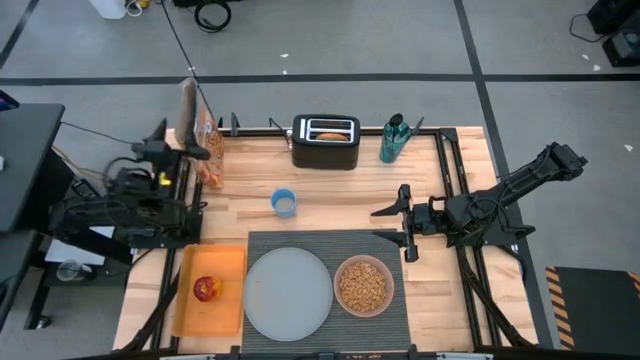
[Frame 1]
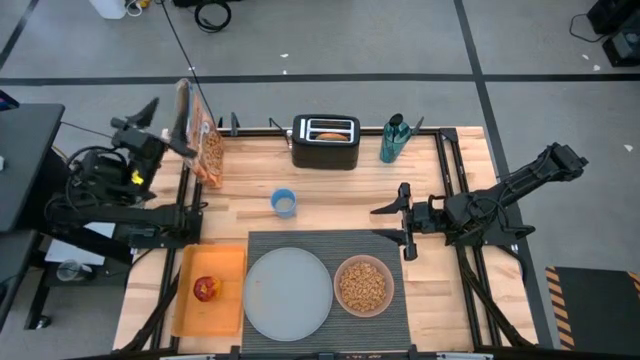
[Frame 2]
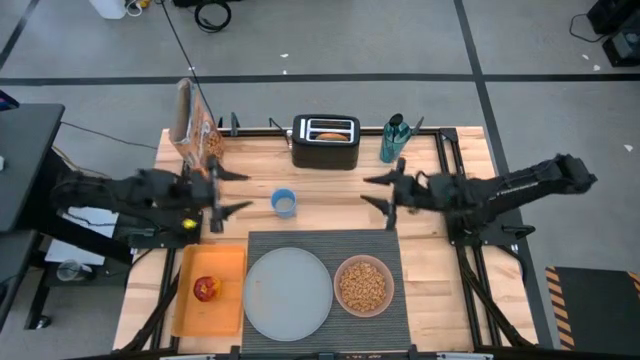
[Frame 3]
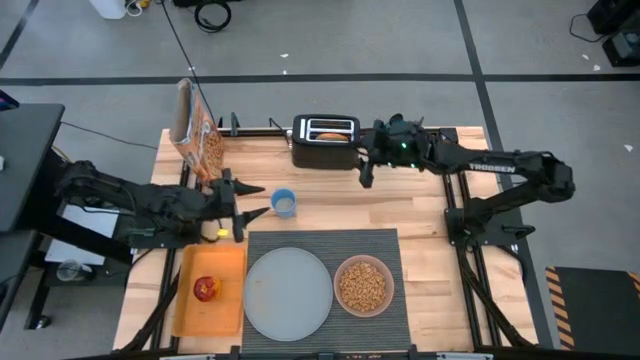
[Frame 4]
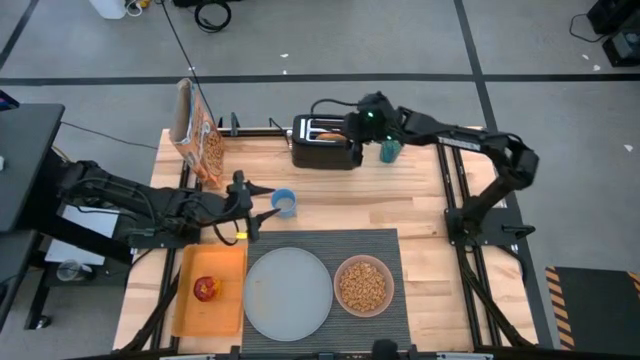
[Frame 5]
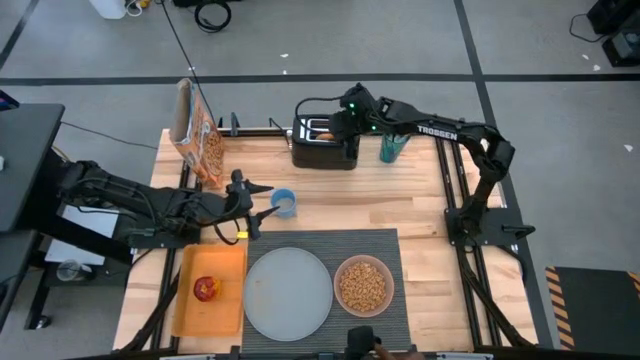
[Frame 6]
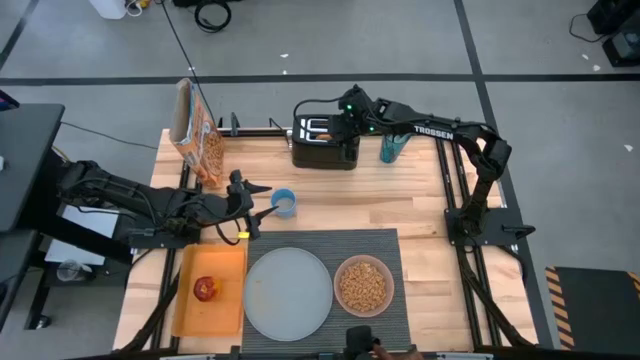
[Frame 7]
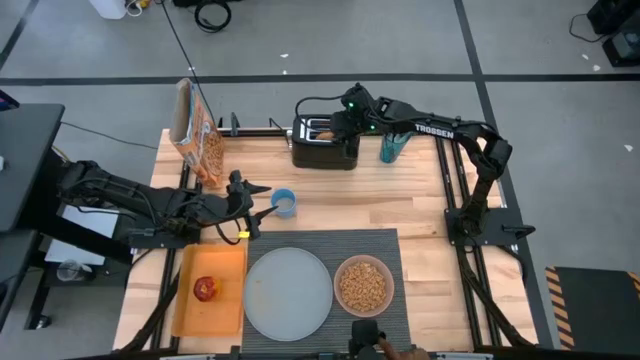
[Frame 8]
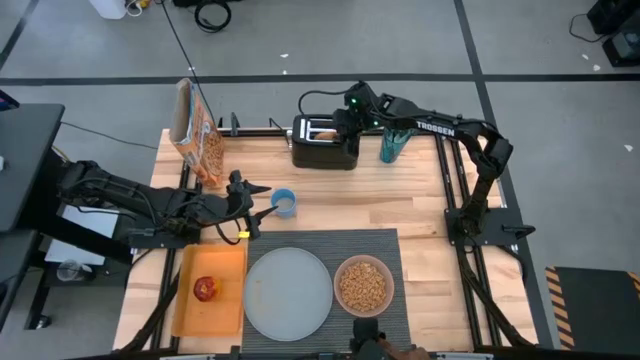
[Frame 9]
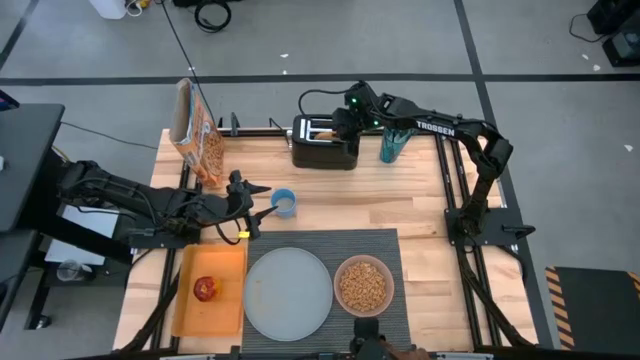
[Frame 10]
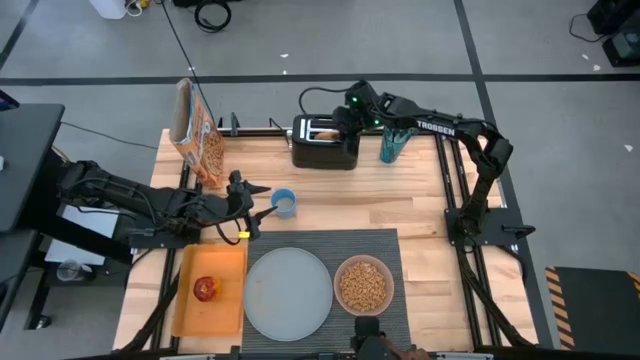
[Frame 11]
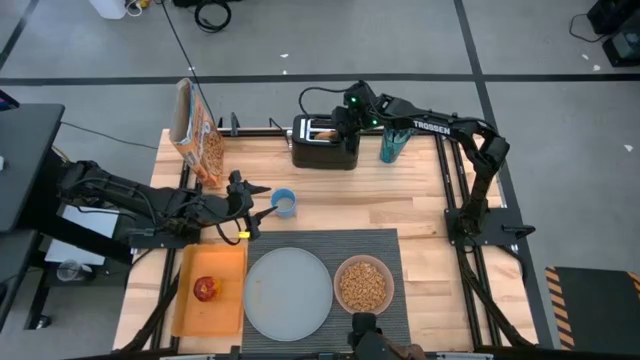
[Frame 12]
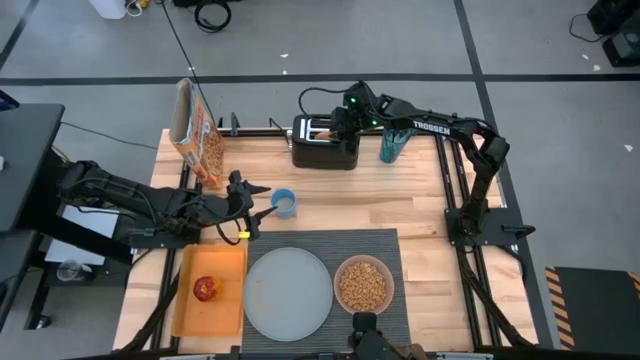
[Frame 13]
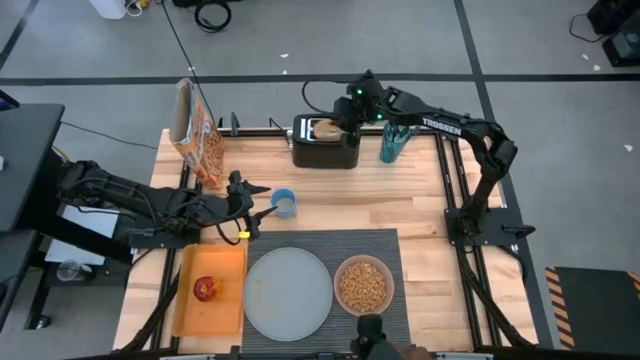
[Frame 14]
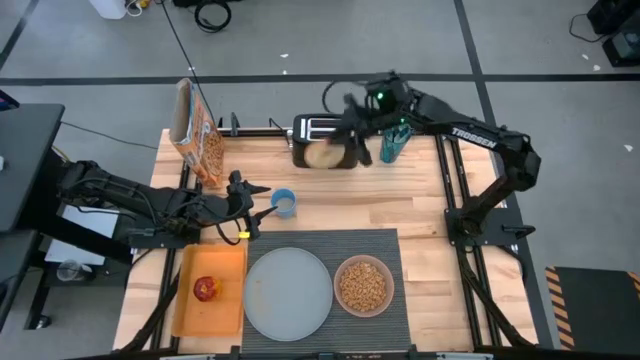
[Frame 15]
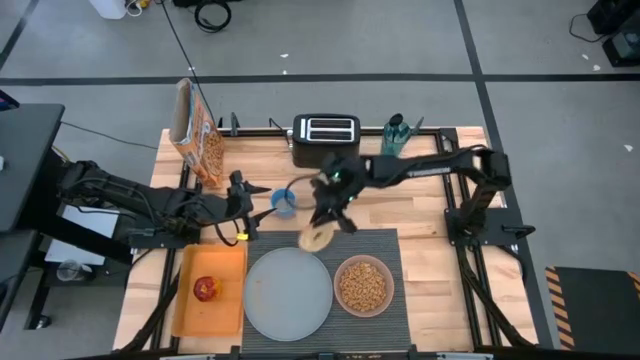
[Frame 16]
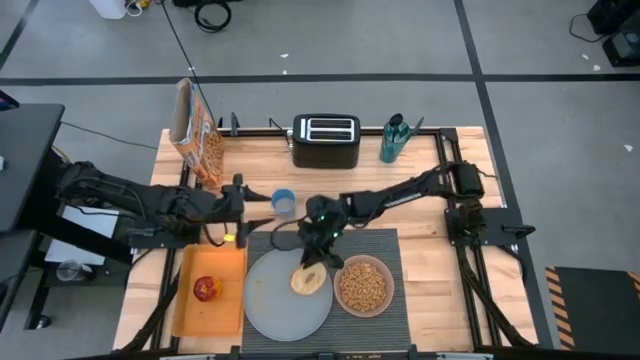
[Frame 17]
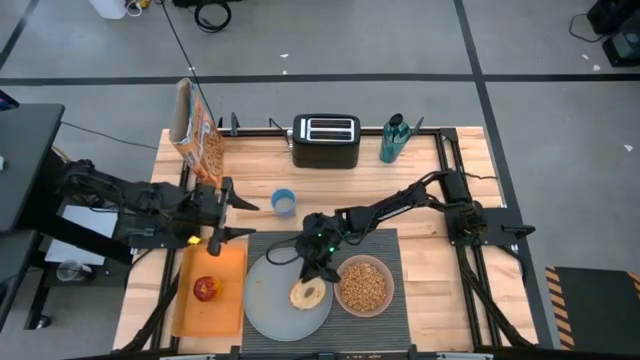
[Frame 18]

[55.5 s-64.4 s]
Task: Arrange a breakfast setting
Put the toasted bread on the gray plate

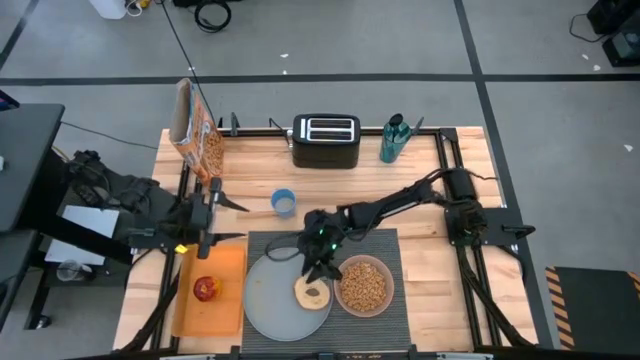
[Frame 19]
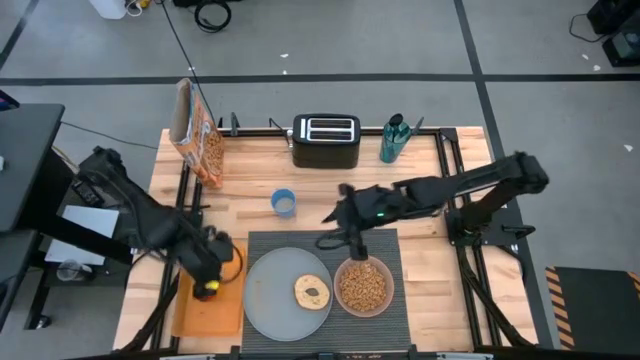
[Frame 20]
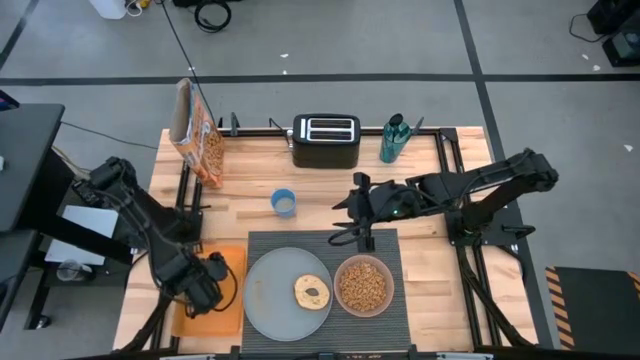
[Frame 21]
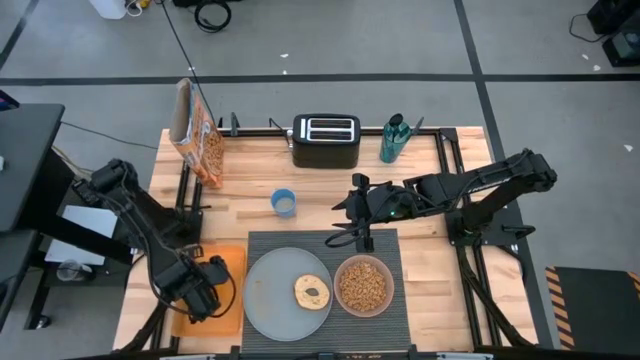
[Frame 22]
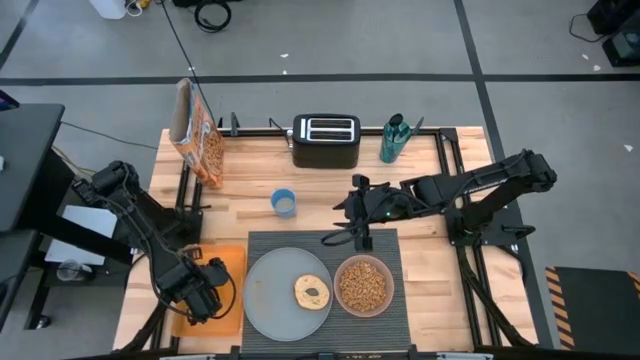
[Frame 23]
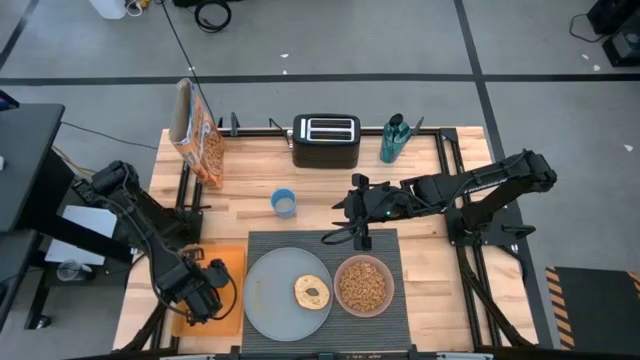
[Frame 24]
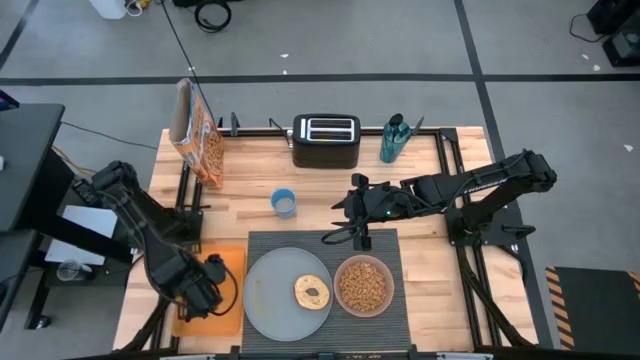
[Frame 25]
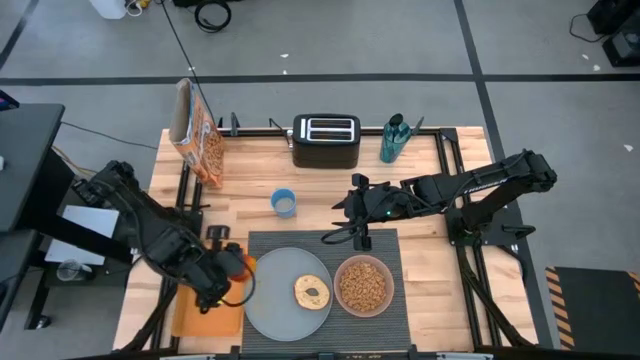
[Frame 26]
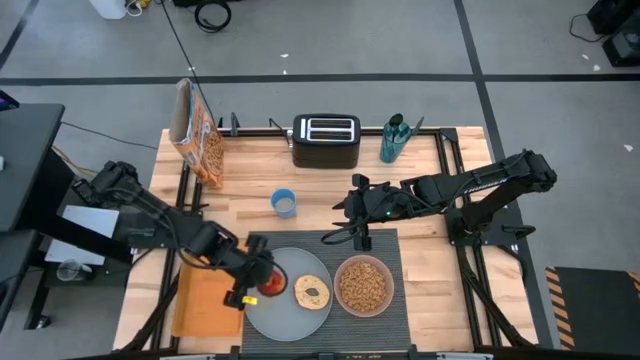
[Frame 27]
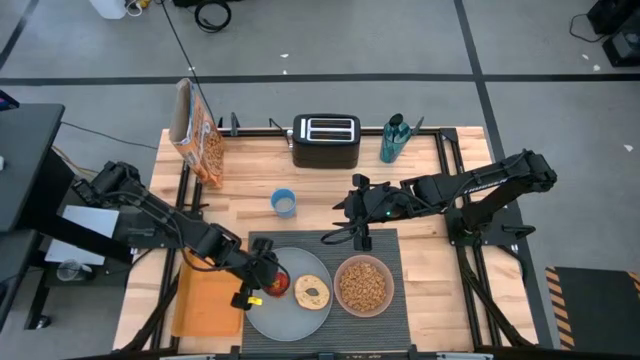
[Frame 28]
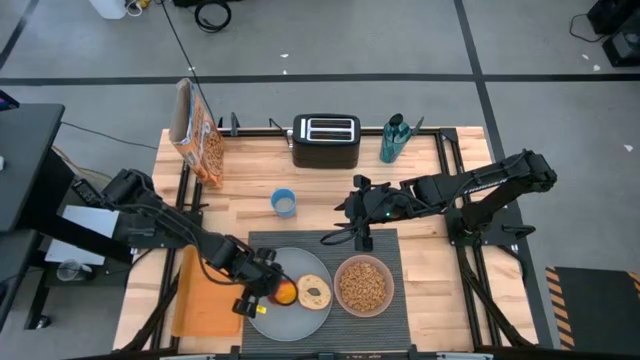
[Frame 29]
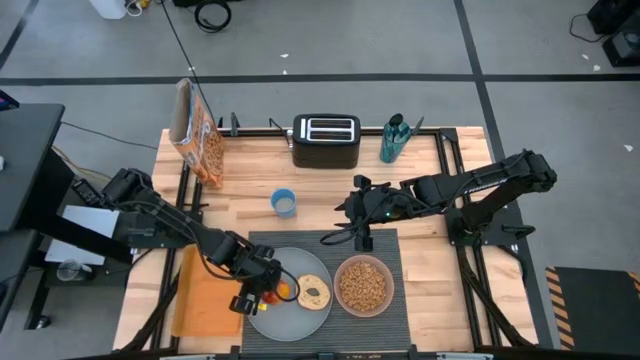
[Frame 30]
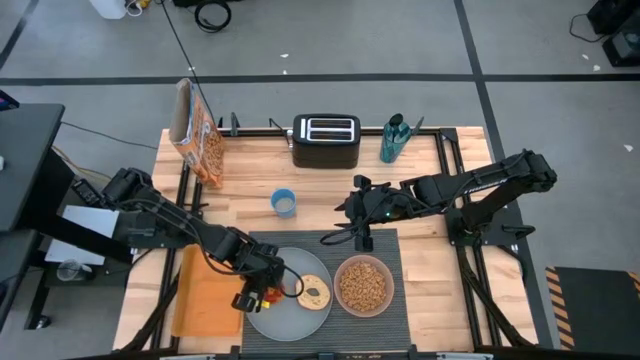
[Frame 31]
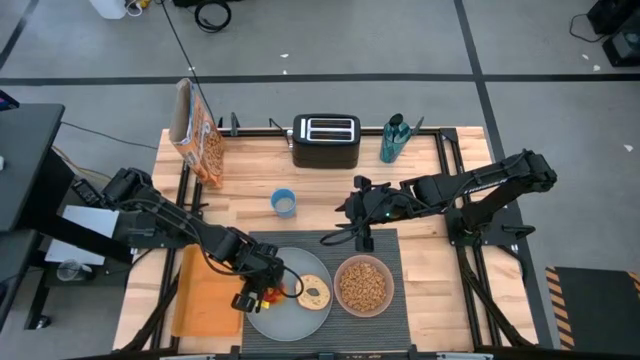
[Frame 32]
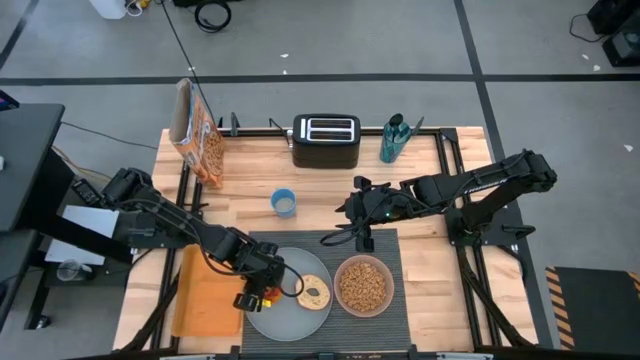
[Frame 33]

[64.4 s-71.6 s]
Put the red apple on the gray plate

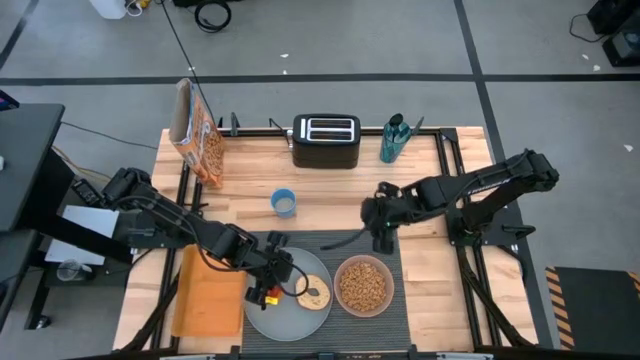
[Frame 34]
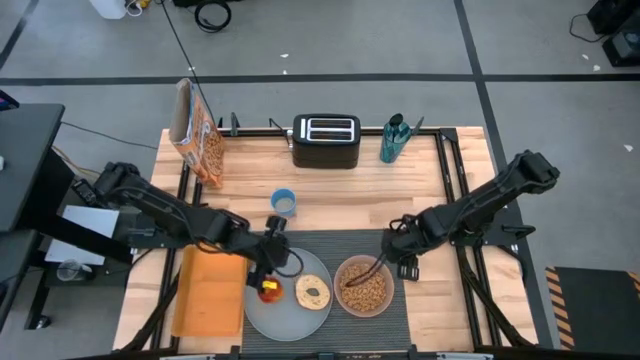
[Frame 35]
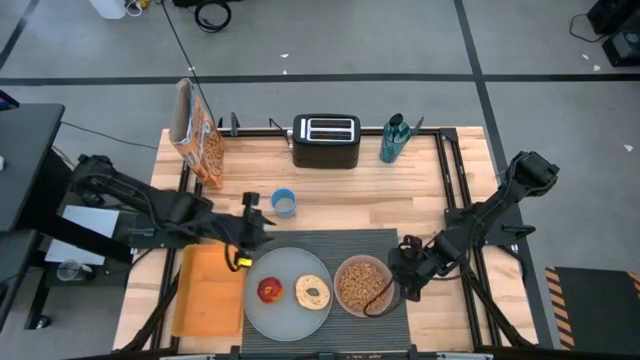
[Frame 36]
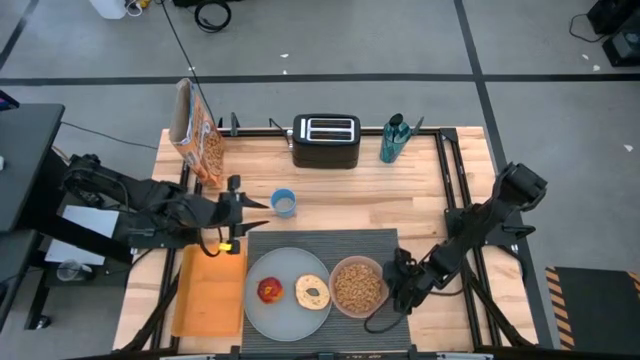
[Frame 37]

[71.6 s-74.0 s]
Adjust the gray table mat

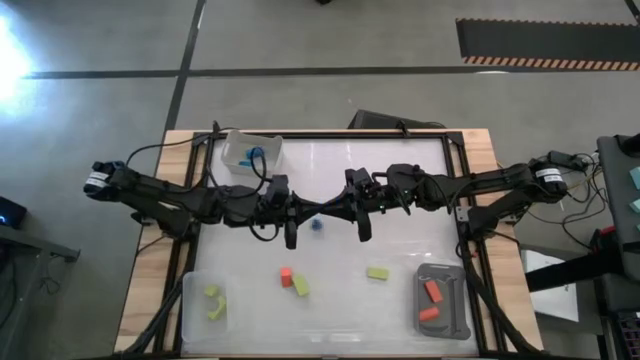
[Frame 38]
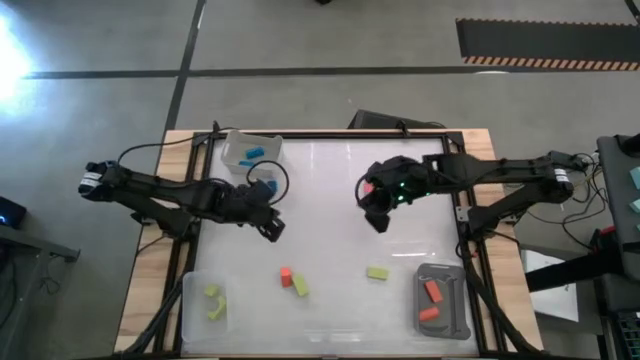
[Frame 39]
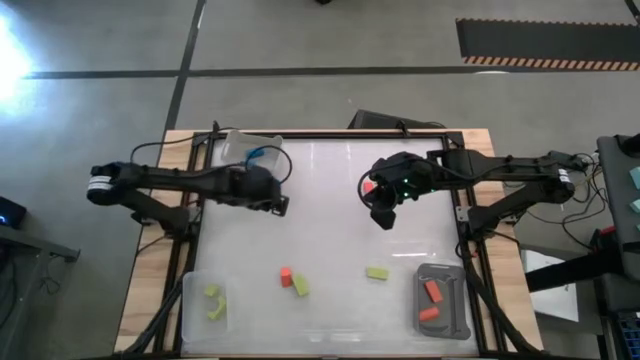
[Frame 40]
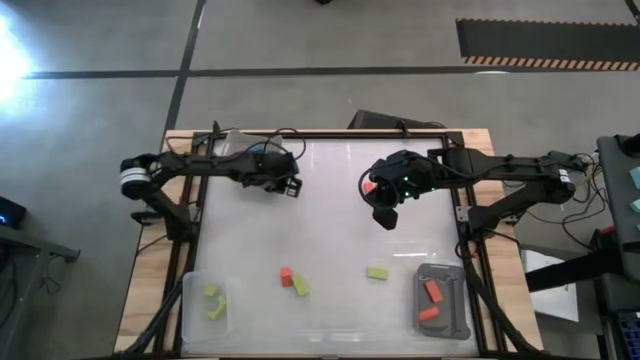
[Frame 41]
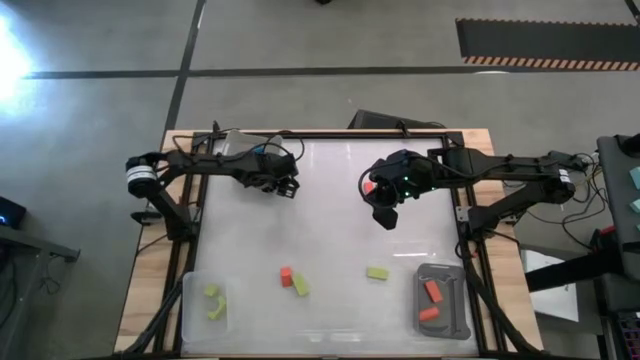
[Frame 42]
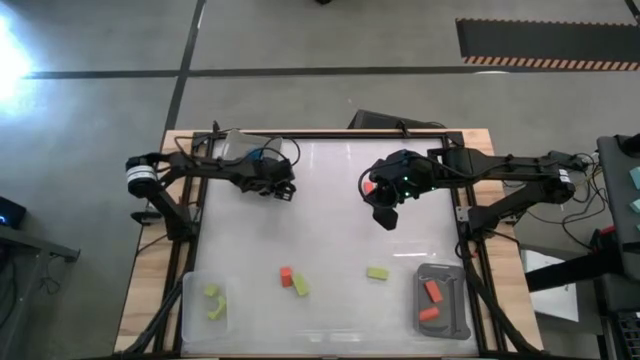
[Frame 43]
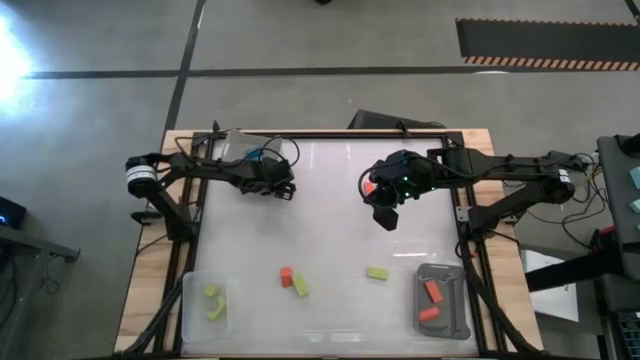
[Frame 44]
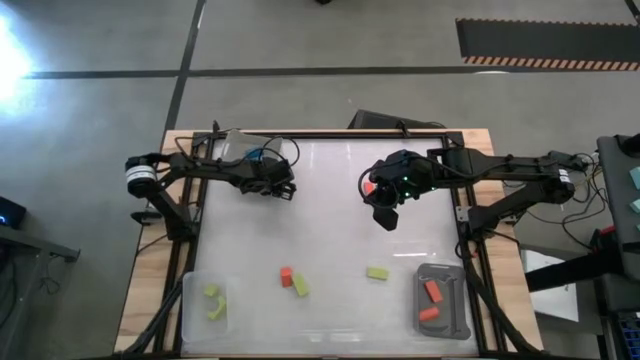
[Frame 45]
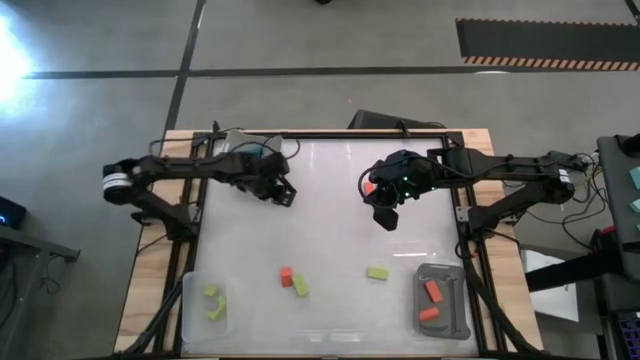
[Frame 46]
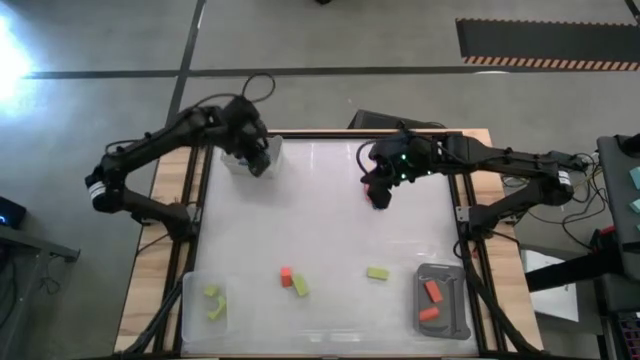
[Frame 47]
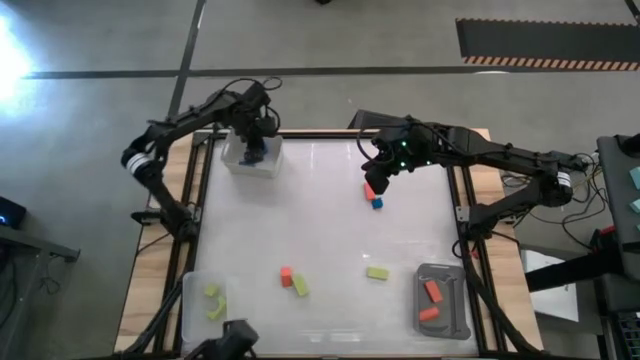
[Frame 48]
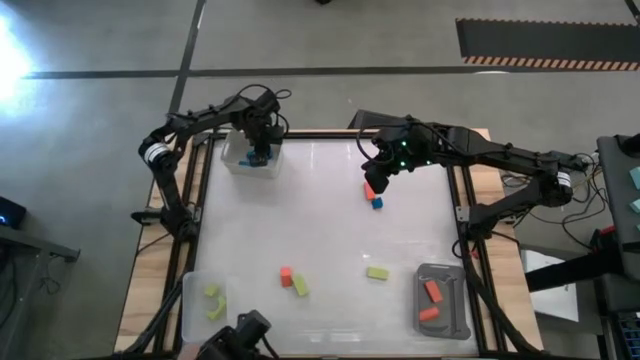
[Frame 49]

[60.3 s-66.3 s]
Task: Sort & place blocks by color
Put the blue block into the white bin
